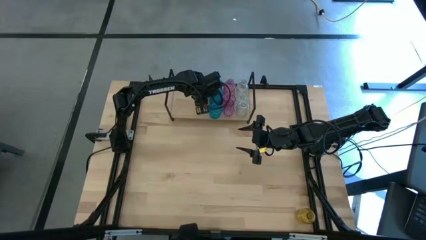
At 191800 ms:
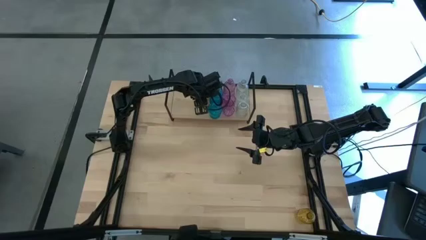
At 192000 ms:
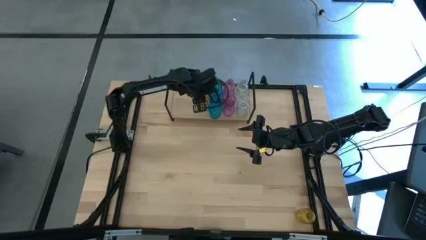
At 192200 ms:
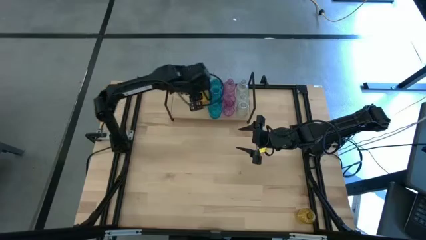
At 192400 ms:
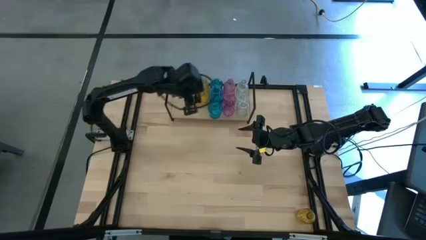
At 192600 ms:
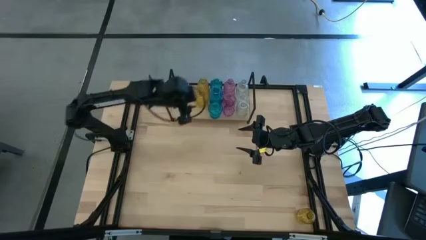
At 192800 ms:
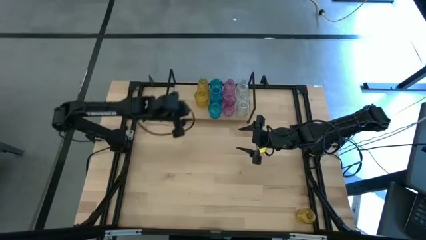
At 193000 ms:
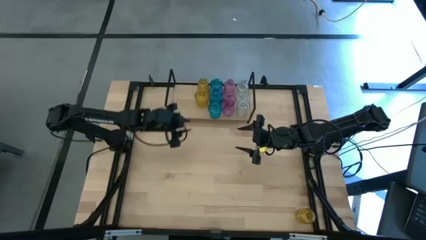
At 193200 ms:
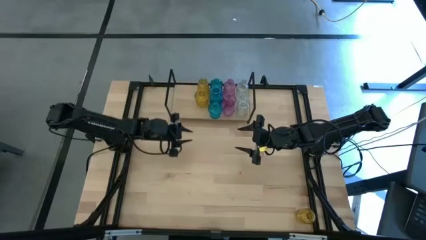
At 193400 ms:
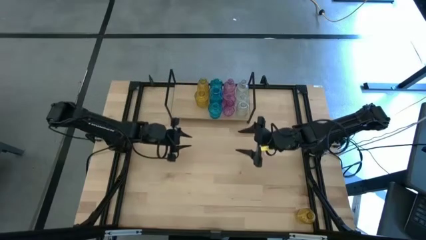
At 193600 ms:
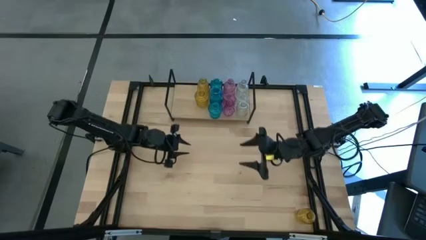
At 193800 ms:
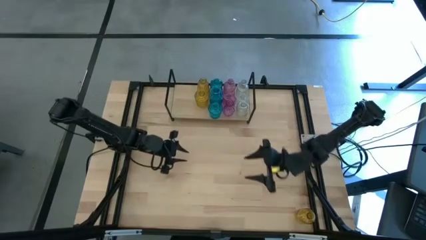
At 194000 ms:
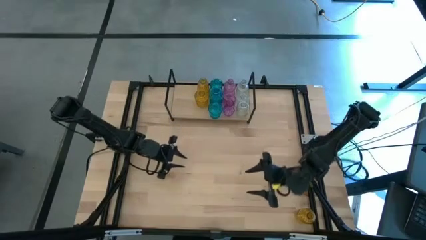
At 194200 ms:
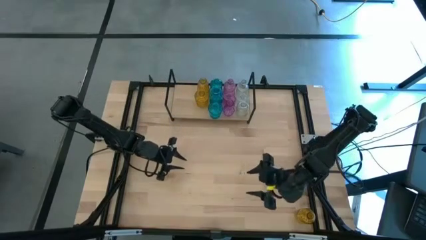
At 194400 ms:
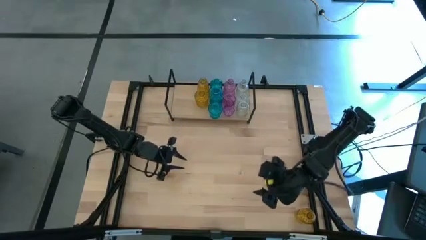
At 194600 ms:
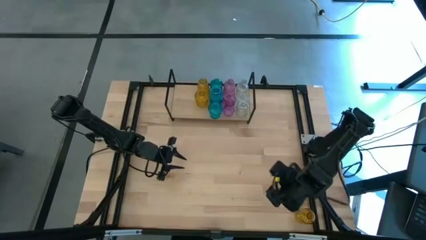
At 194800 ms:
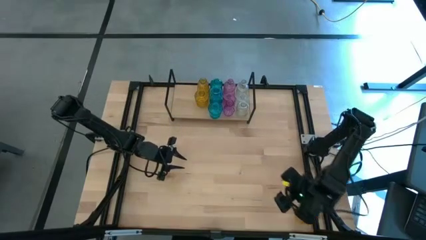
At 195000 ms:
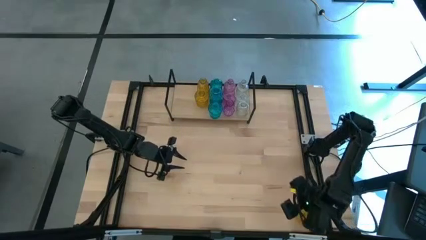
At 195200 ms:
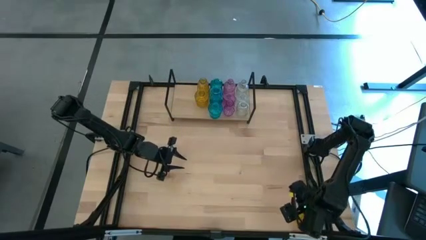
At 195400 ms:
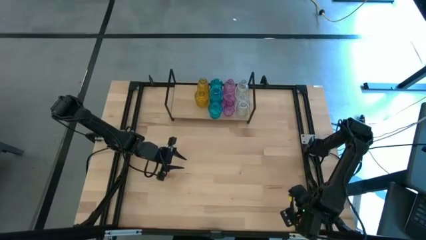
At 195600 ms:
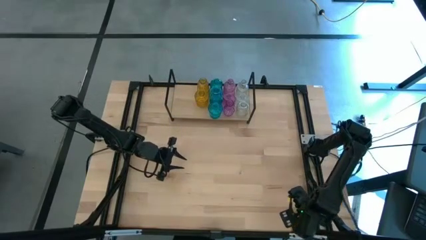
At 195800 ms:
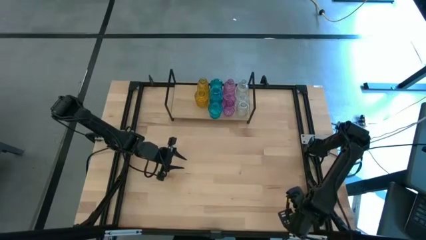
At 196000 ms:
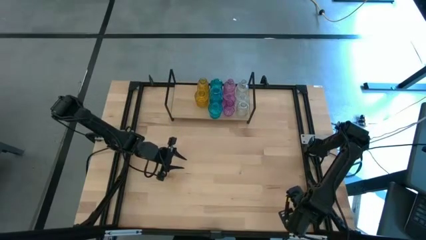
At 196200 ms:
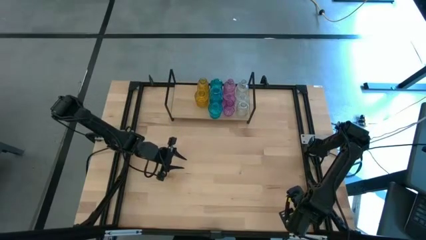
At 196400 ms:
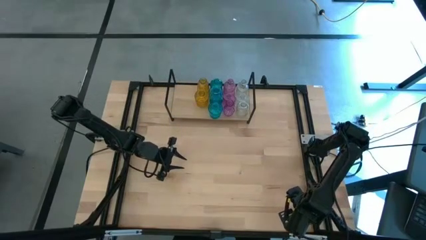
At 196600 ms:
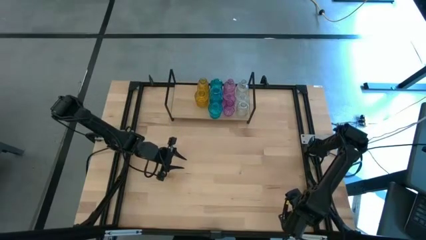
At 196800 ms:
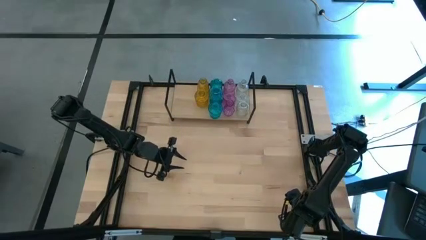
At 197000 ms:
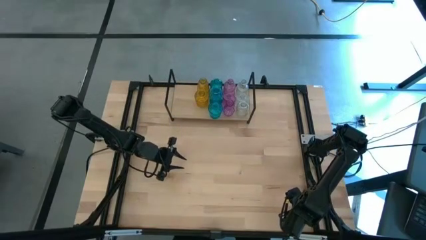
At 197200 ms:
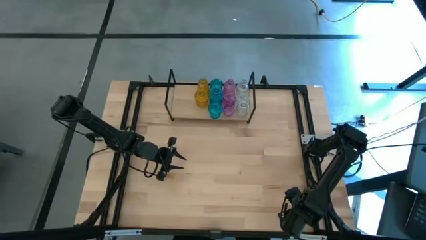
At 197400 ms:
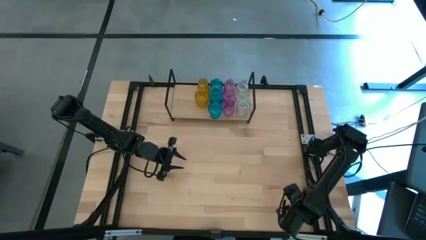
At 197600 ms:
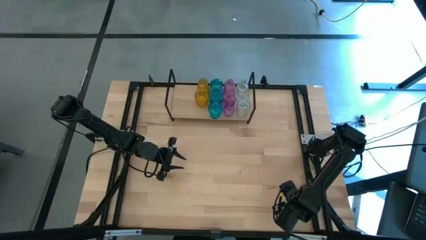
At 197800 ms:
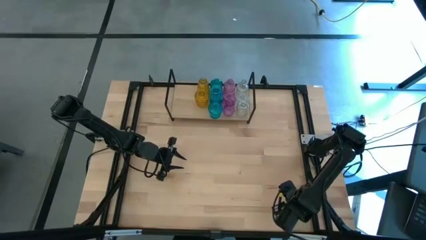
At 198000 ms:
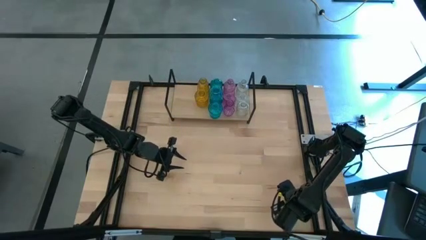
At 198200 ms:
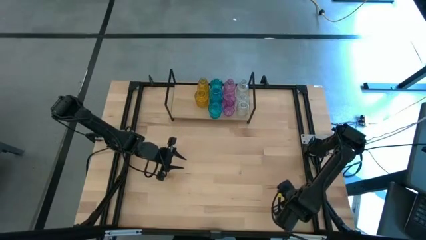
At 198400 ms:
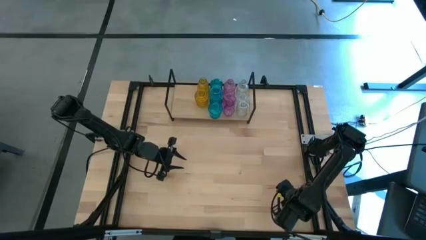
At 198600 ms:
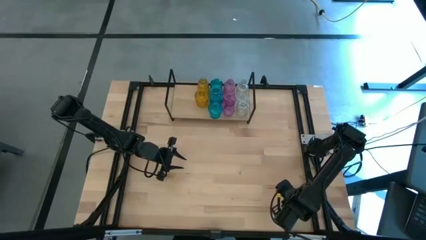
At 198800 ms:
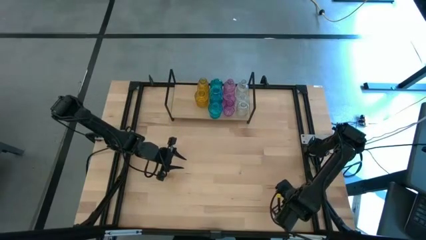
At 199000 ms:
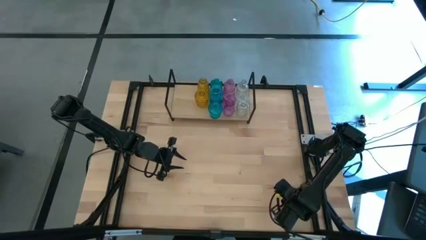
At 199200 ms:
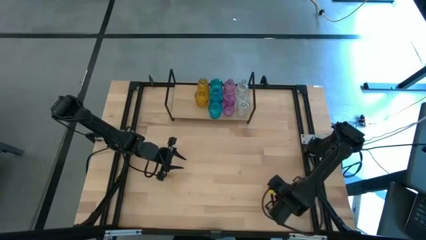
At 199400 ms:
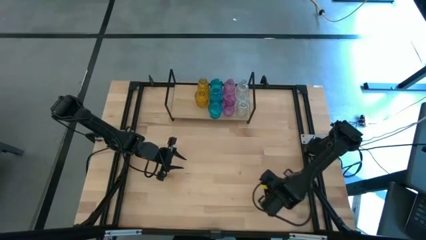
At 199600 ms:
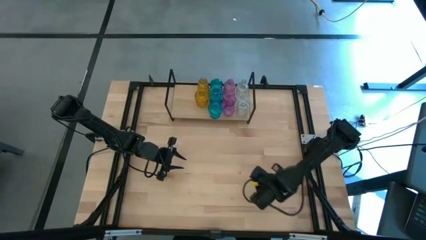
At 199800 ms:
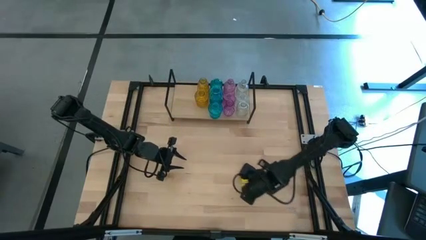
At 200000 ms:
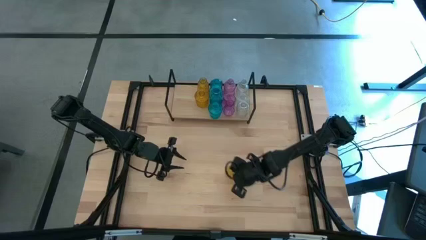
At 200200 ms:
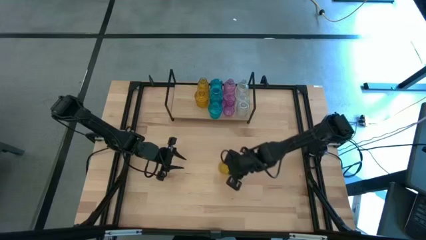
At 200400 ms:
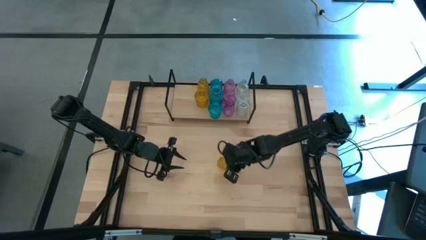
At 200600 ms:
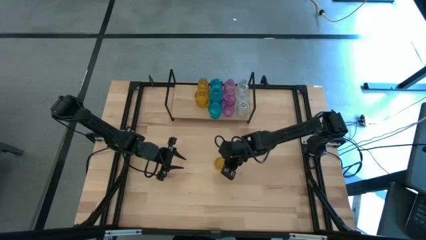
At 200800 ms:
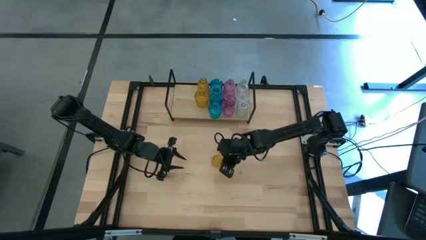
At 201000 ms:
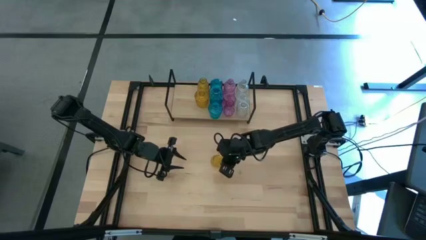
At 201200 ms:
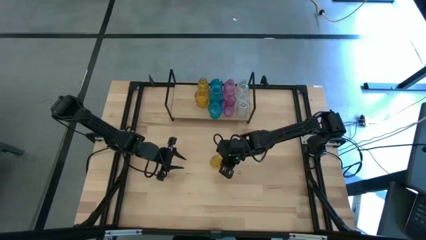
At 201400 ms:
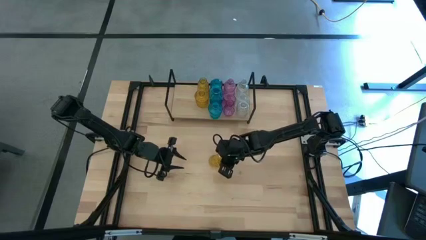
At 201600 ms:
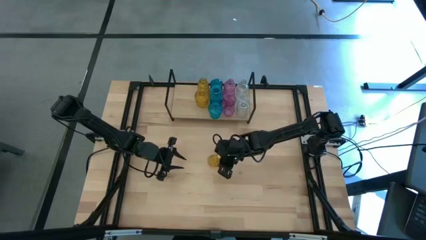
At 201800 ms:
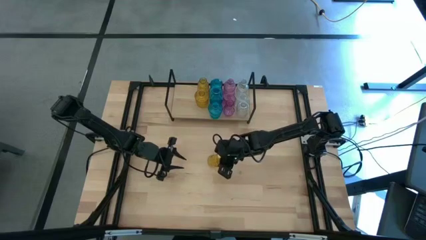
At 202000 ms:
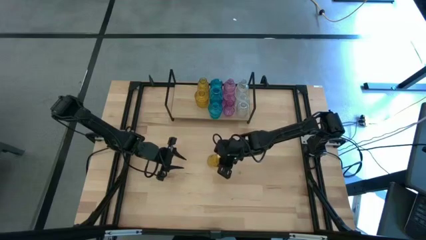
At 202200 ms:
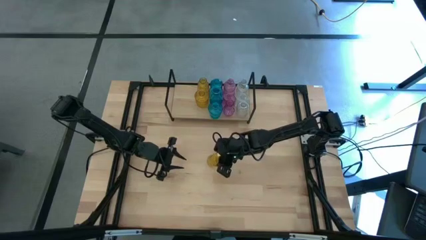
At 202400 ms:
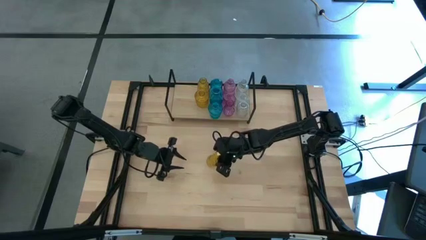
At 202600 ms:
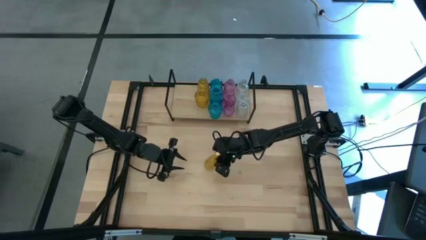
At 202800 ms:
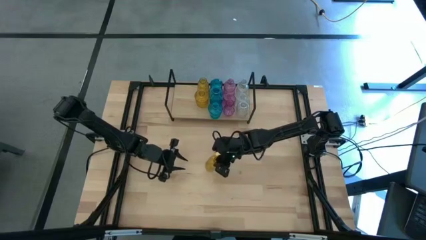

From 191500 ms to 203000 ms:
Task: sort vases onto shelf
Put the yellow vase on the shelf aligned with the other yellow vases
